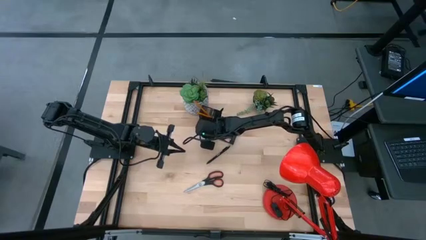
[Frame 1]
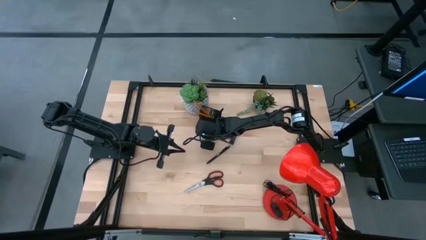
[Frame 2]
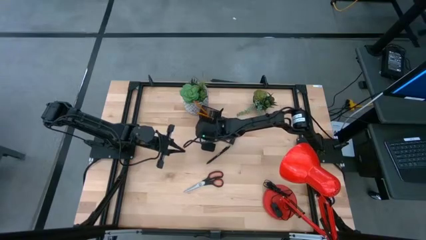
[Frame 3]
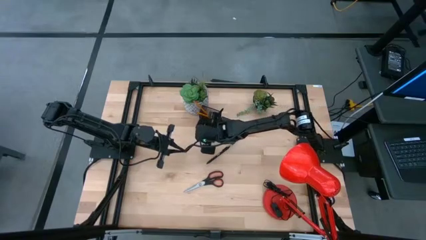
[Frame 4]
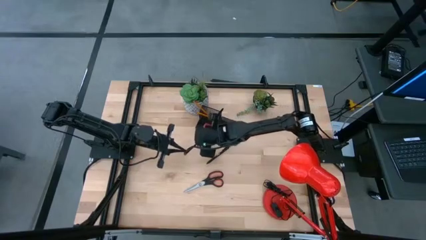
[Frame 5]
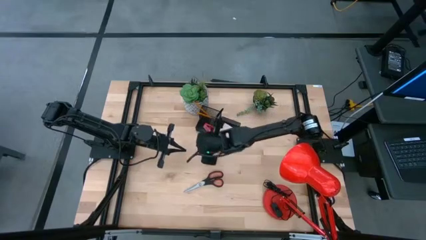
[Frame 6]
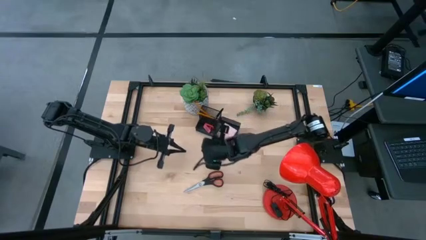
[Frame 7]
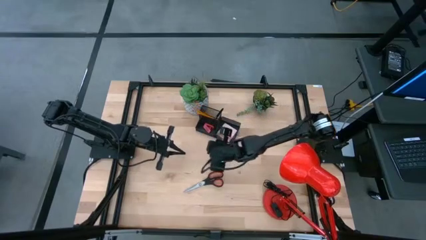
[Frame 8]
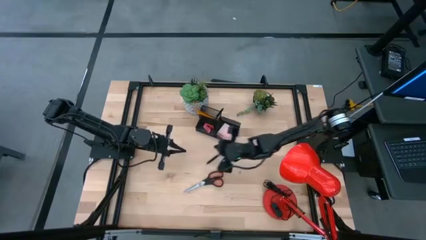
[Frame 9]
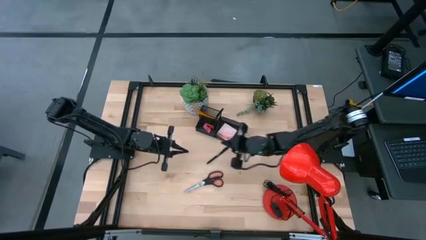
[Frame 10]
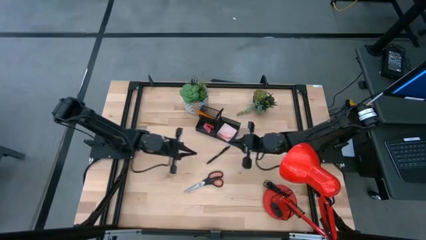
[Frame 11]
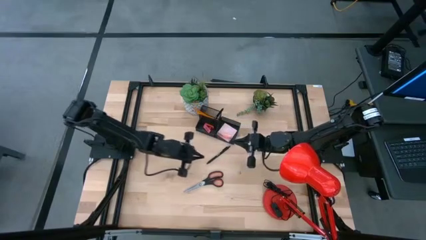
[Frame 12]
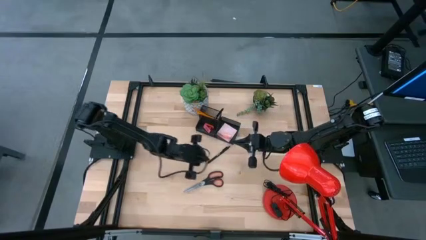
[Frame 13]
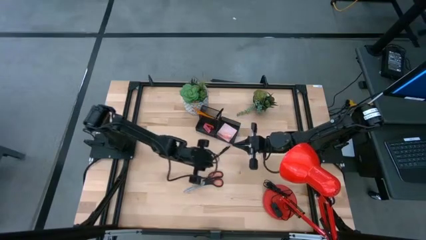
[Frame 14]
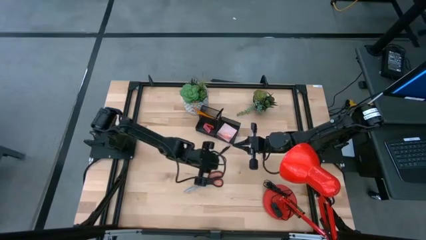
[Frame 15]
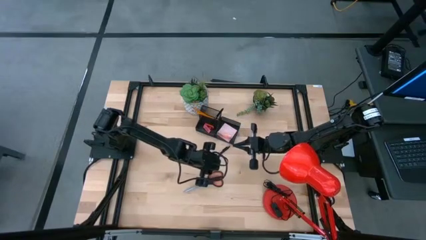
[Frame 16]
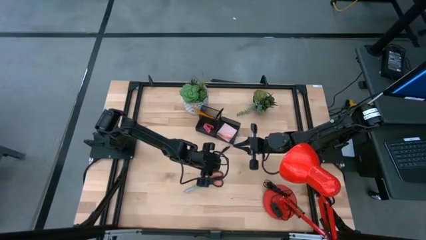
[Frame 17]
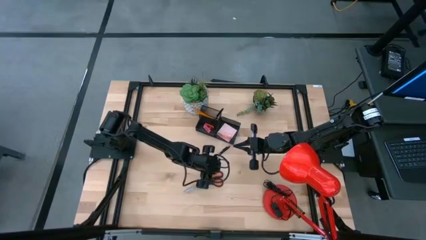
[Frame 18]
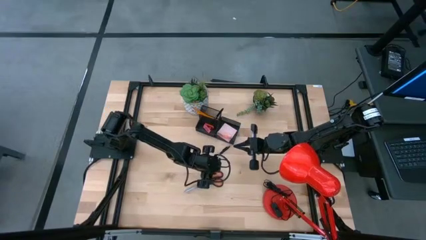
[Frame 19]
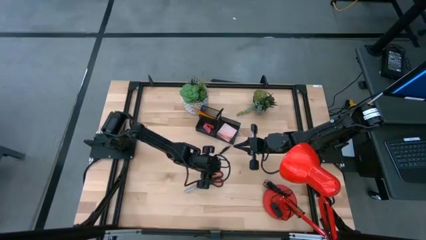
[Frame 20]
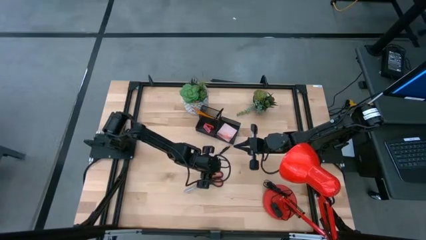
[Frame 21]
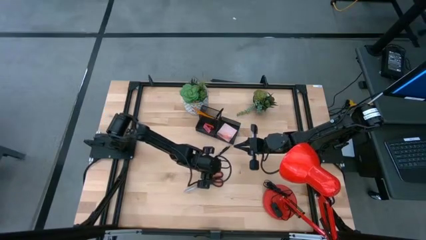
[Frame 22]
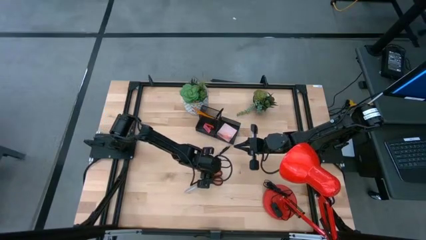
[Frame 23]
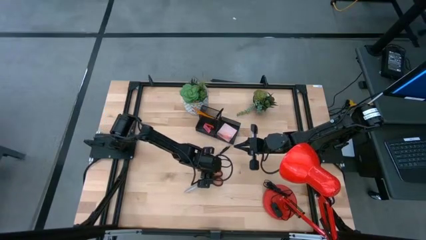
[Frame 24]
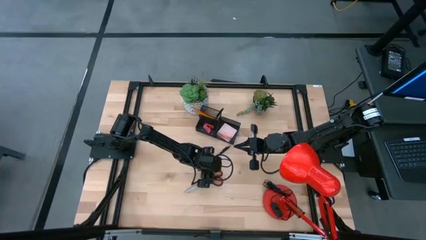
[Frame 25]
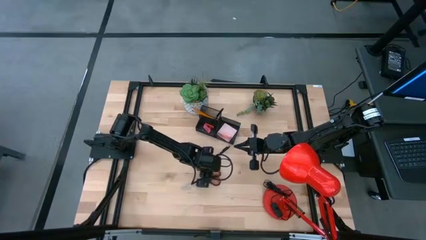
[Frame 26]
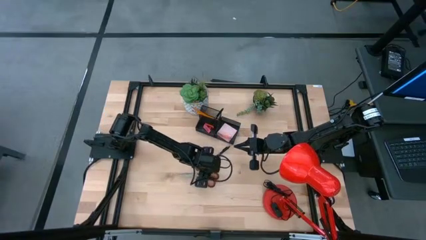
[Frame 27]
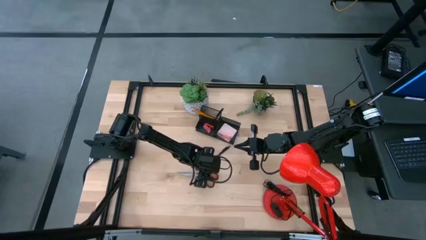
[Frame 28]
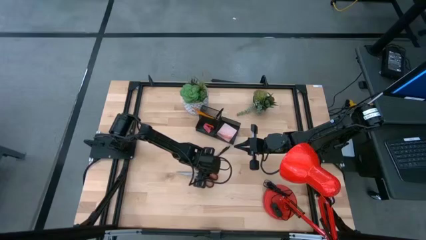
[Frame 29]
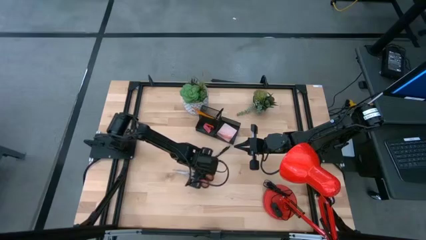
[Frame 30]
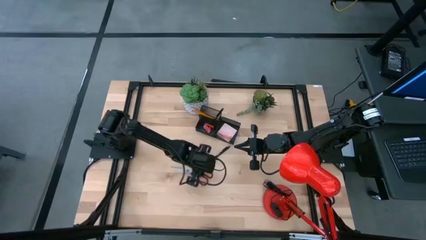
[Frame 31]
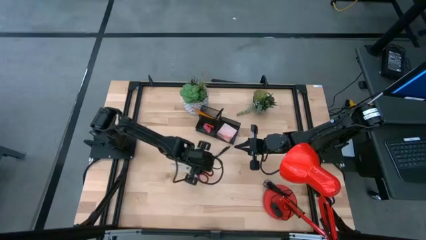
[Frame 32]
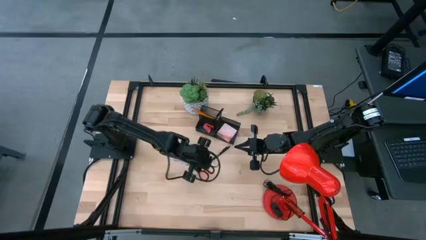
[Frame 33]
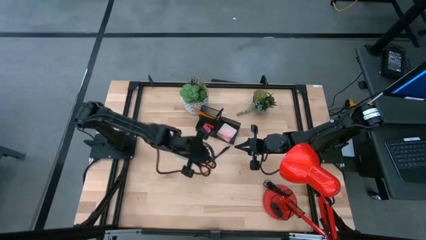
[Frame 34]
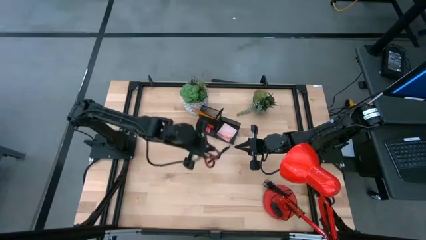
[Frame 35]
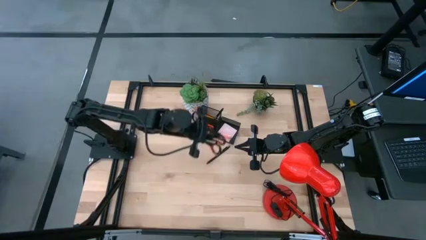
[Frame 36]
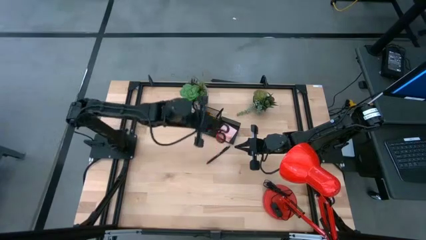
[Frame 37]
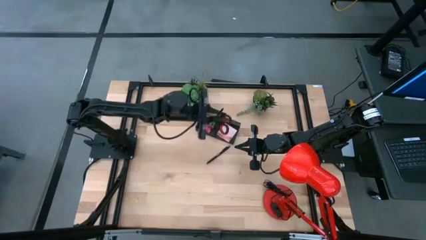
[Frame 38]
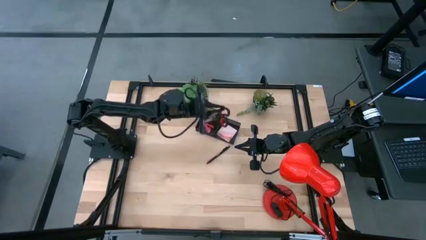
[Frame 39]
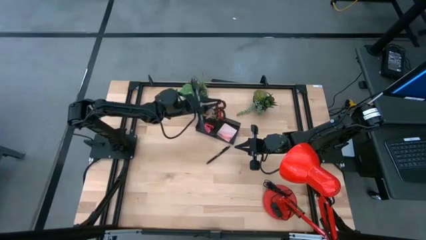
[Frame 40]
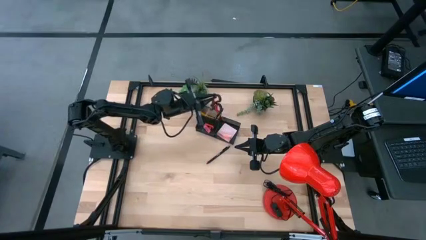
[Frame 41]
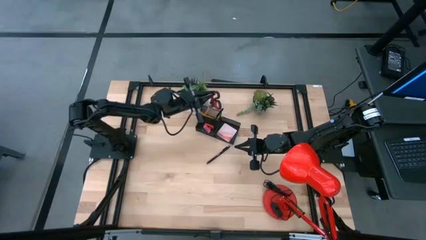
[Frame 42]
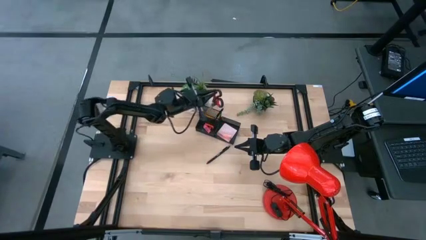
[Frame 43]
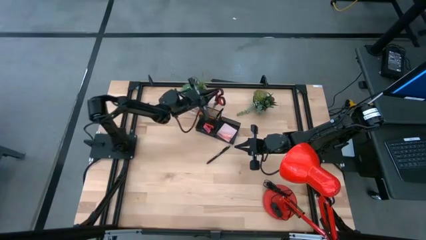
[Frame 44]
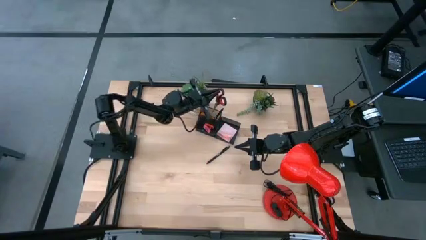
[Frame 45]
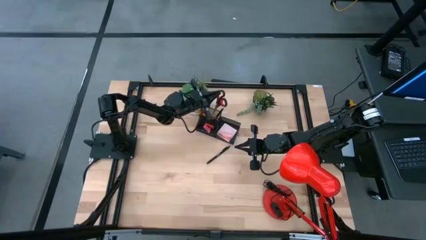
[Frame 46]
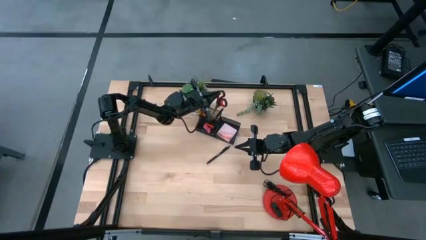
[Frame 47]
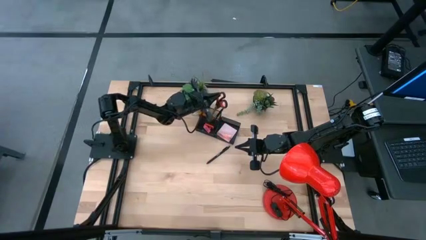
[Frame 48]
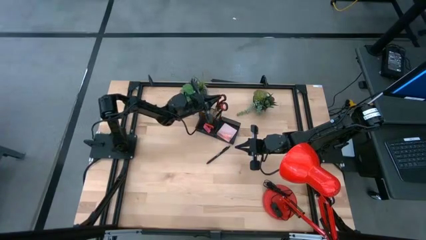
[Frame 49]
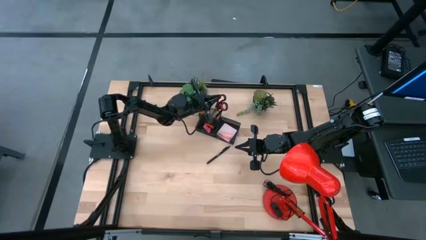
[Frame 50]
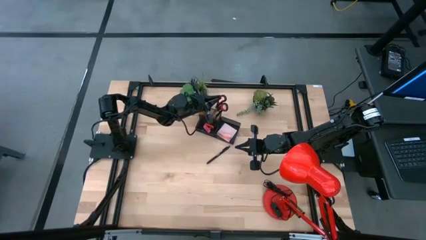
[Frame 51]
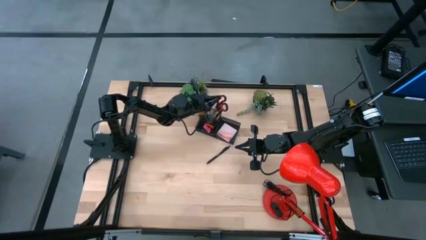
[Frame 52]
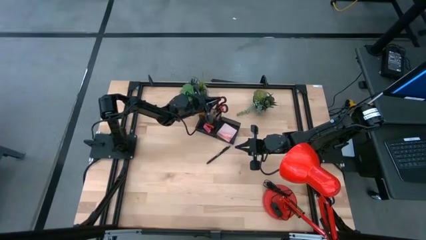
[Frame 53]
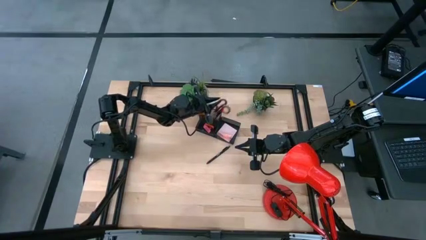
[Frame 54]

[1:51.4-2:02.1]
Task: Pick and place office supplies into organizer
Put the black red scissors into the black desk organizer

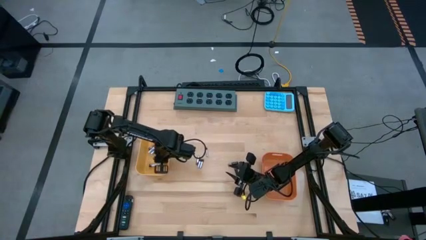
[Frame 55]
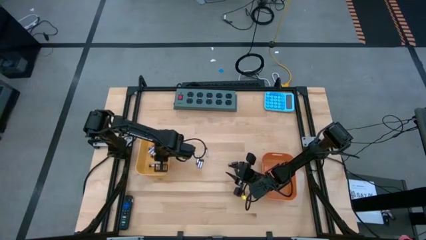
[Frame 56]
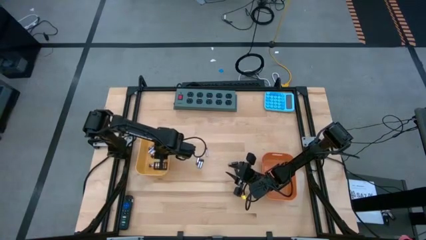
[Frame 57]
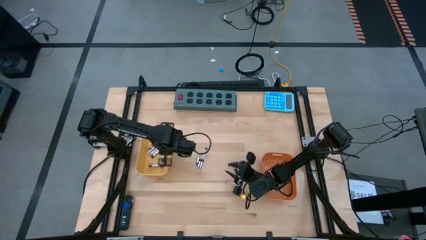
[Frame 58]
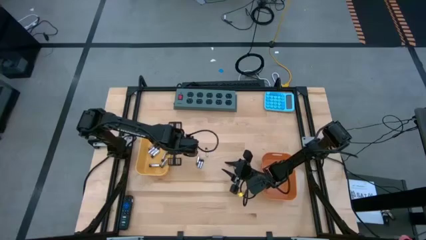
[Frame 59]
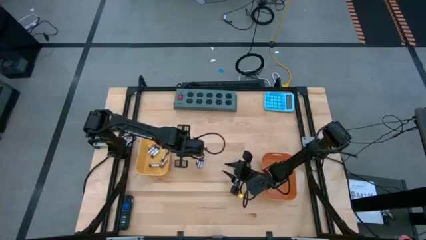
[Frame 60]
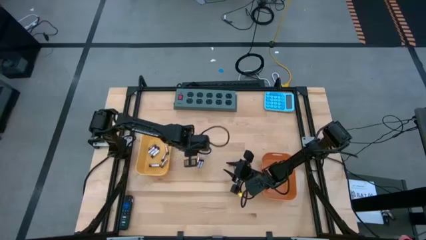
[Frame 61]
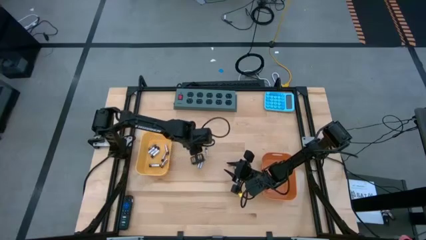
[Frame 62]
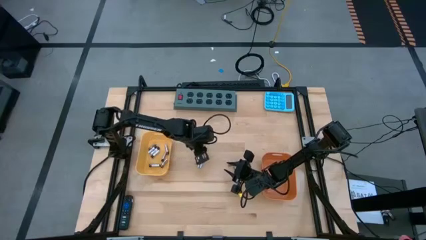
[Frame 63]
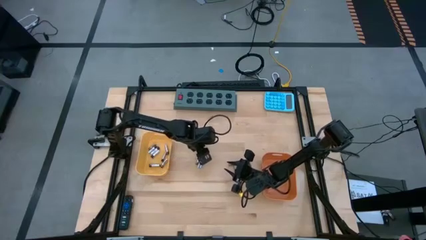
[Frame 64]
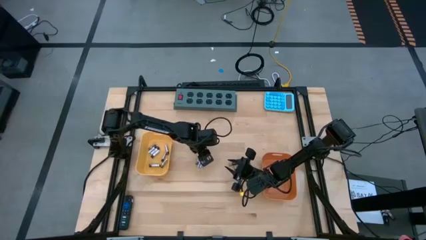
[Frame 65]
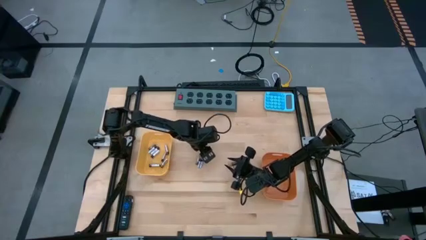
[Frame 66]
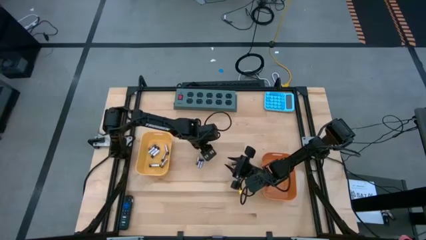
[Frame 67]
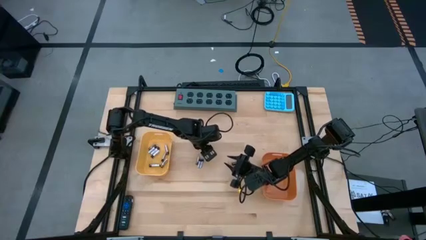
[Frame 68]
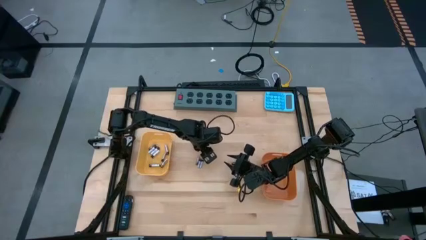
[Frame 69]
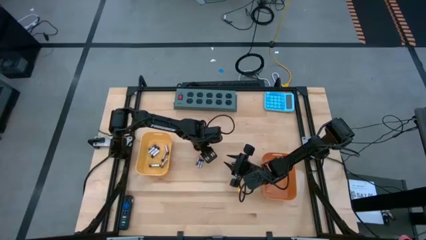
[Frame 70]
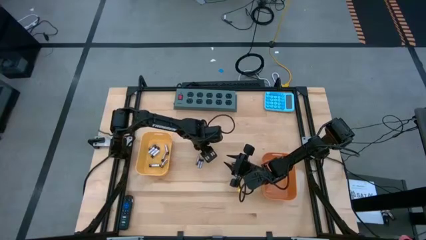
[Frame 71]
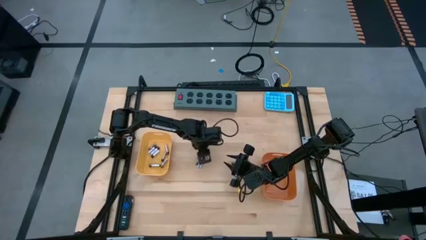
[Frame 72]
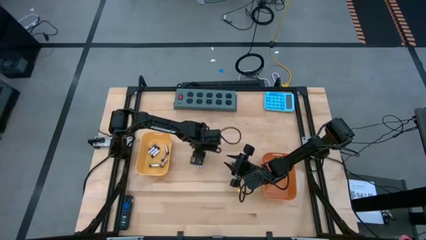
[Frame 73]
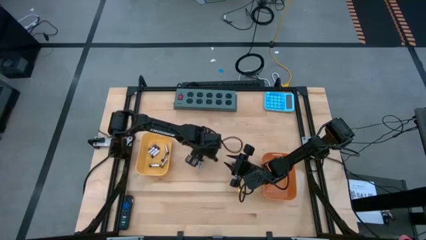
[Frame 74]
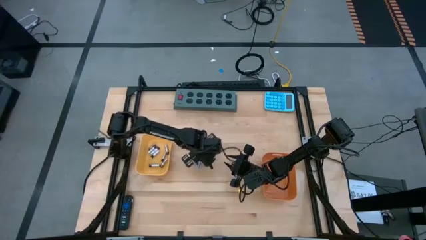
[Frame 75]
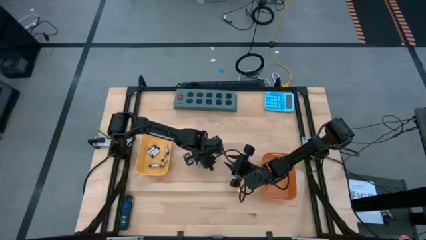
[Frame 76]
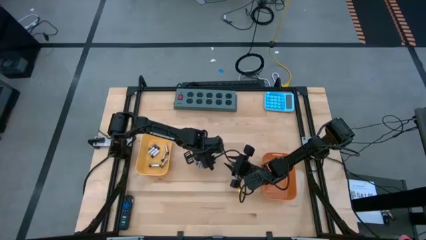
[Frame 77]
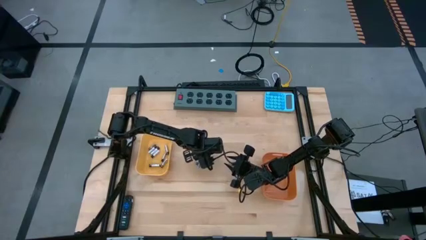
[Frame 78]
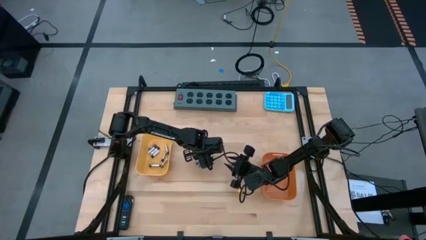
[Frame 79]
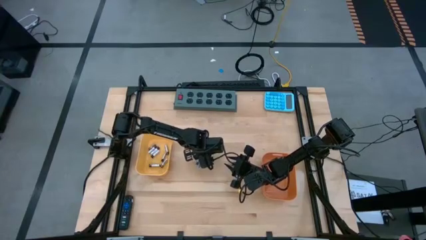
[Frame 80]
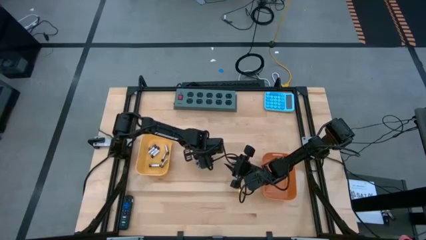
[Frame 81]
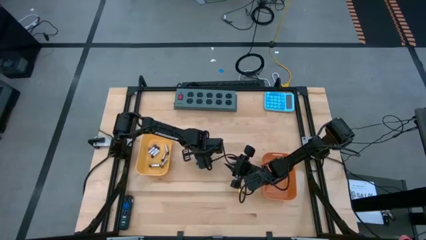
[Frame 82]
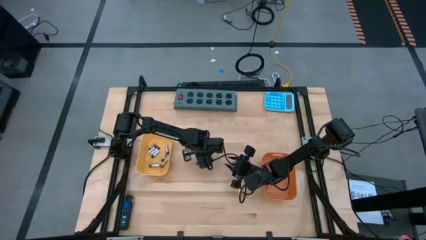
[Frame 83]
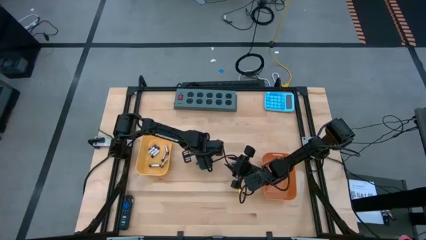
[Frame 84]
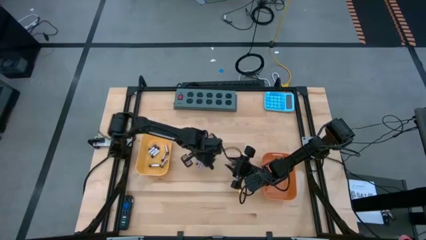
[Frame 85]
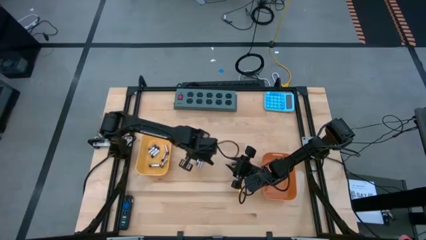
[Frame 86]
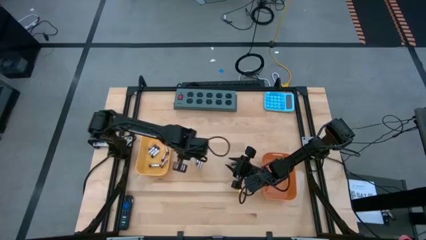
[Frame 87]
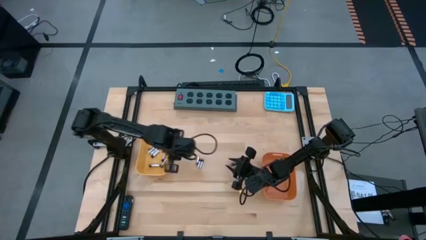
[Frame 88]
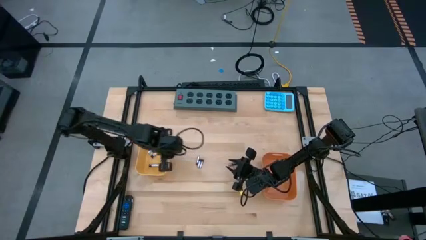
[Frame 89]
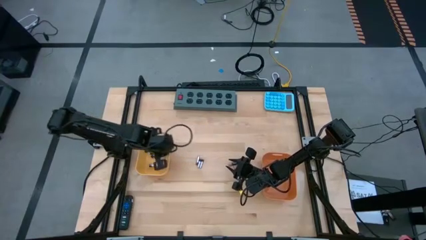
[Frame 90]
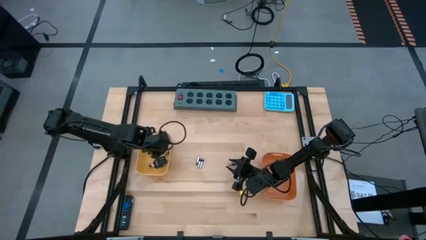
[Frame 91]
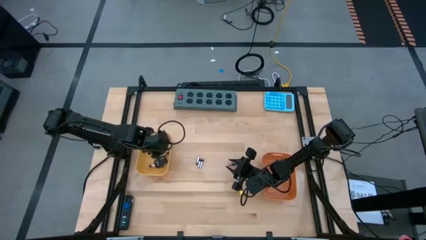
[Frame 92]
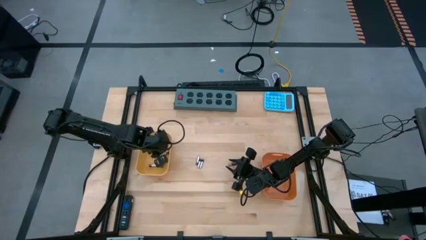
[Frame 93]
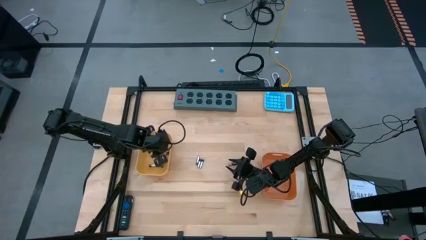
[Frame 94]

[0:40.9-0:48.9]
Task: Sort batteries
Put the silver battery into the yellow bin
